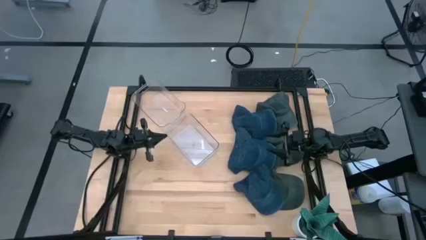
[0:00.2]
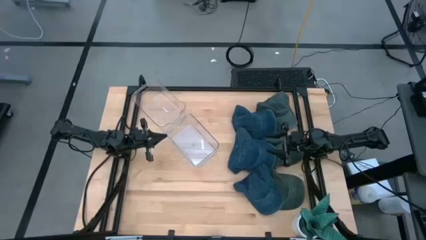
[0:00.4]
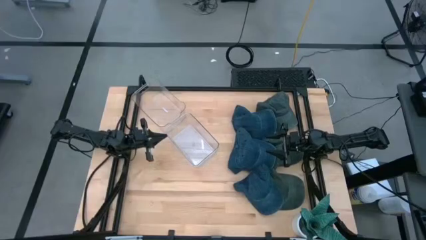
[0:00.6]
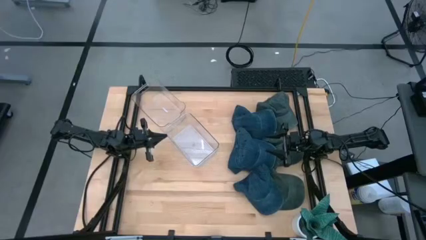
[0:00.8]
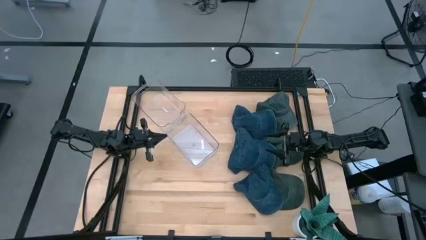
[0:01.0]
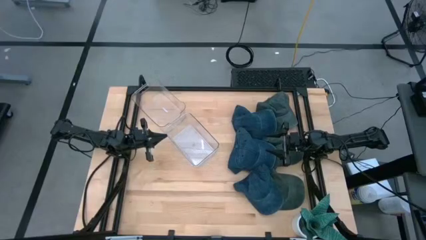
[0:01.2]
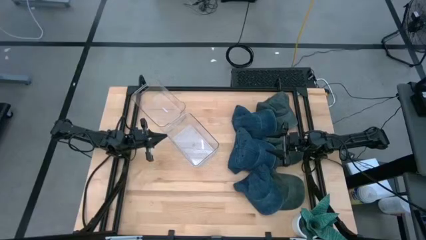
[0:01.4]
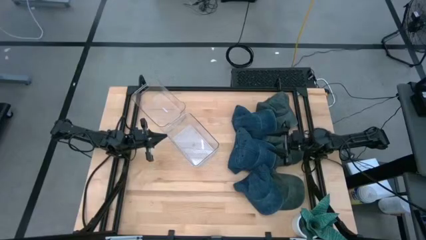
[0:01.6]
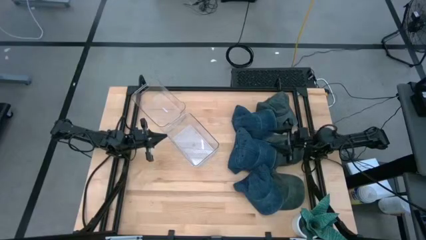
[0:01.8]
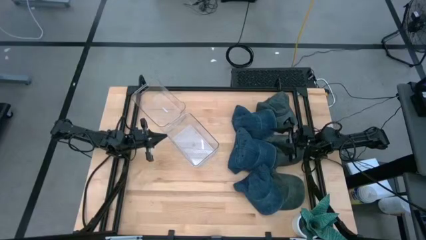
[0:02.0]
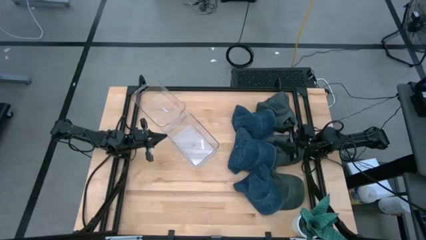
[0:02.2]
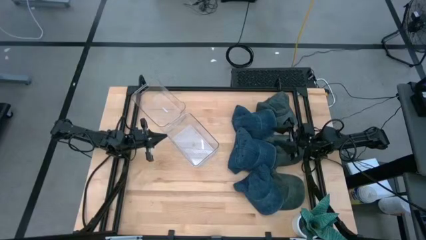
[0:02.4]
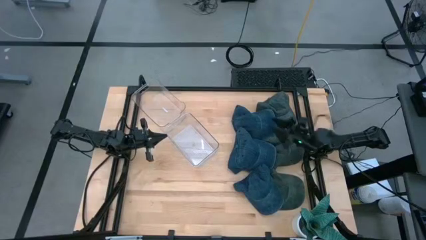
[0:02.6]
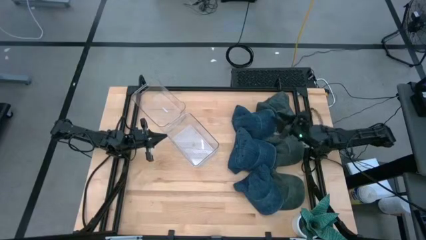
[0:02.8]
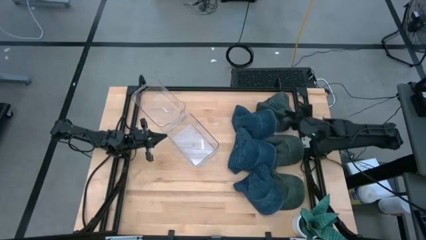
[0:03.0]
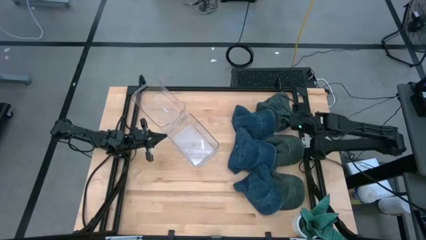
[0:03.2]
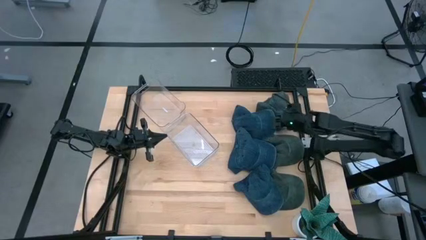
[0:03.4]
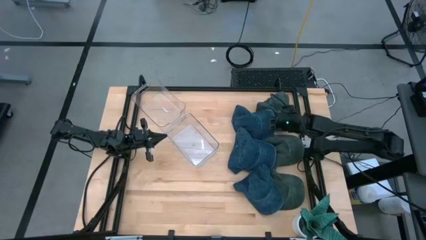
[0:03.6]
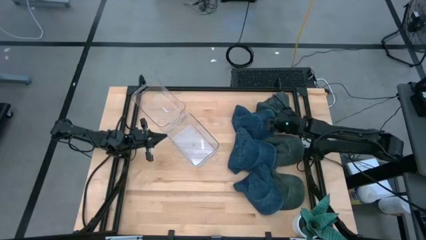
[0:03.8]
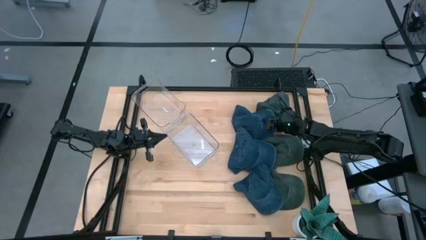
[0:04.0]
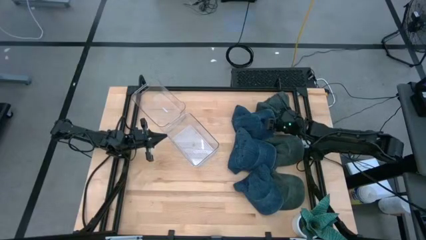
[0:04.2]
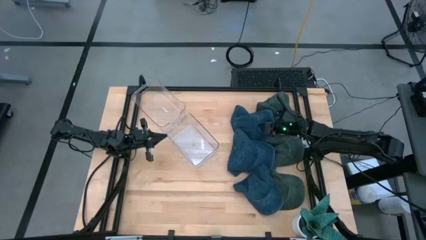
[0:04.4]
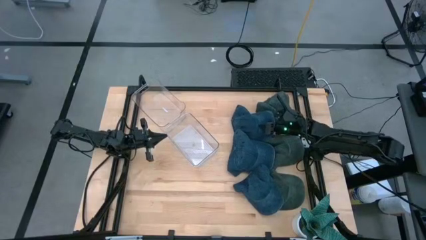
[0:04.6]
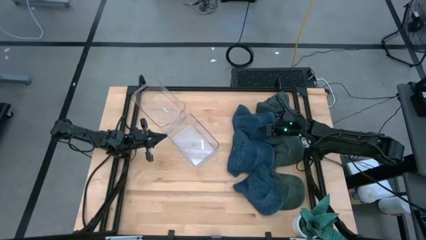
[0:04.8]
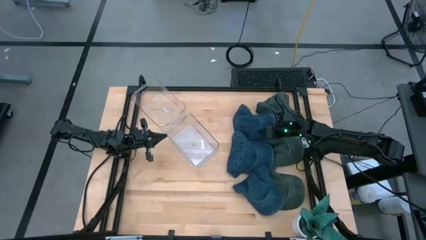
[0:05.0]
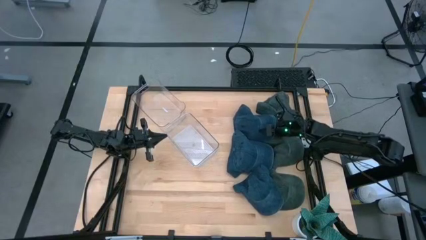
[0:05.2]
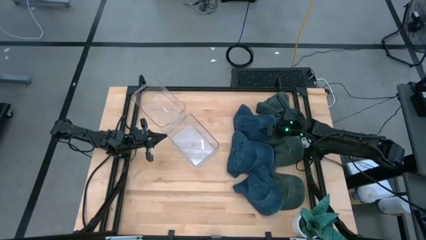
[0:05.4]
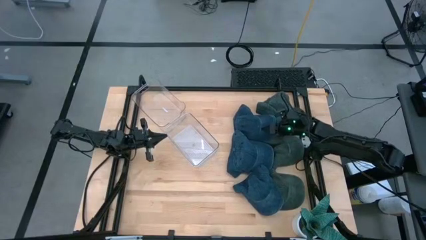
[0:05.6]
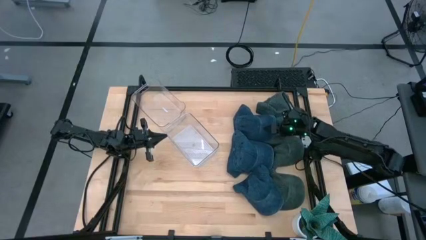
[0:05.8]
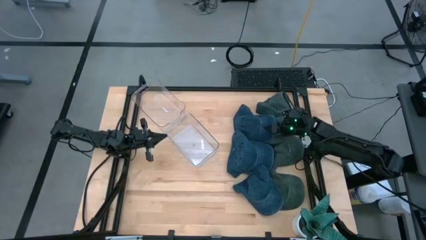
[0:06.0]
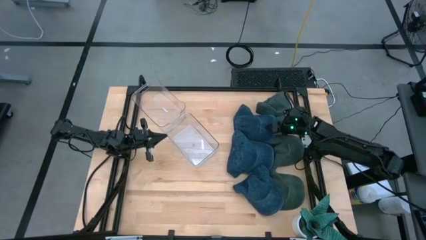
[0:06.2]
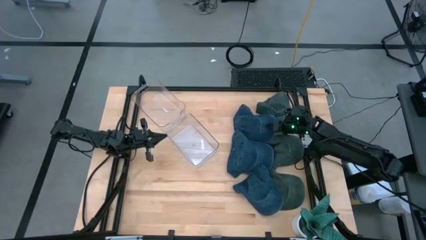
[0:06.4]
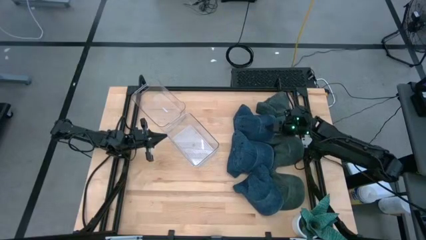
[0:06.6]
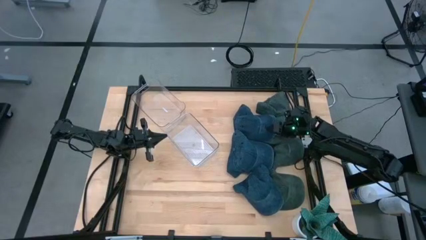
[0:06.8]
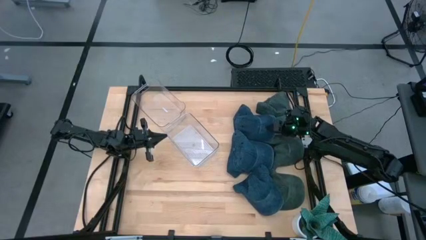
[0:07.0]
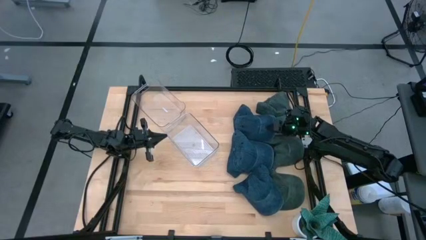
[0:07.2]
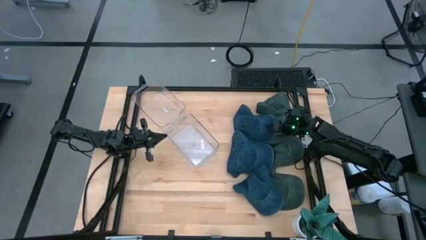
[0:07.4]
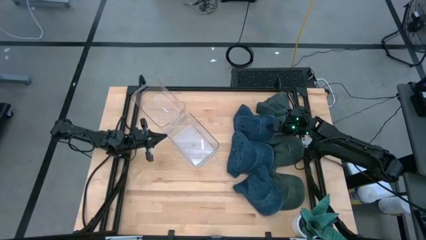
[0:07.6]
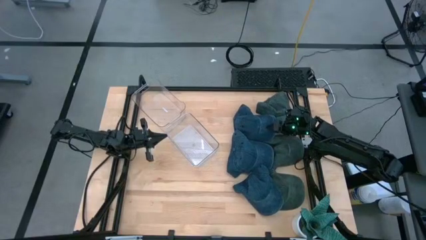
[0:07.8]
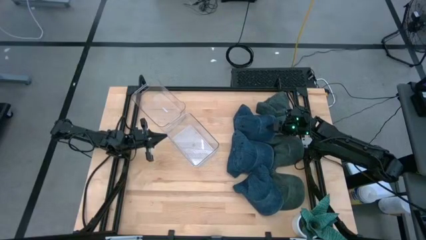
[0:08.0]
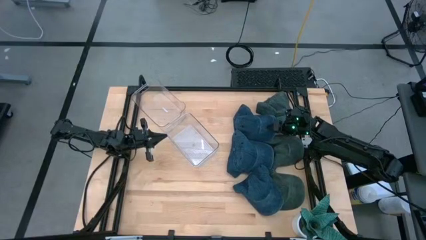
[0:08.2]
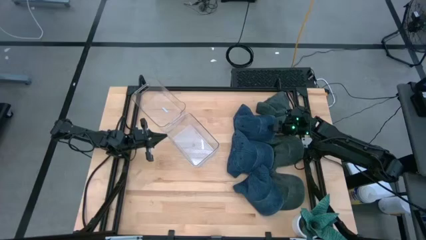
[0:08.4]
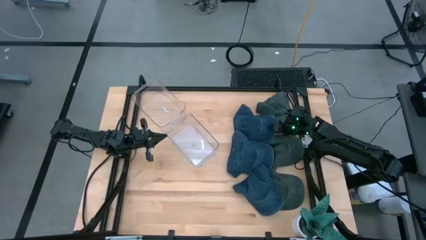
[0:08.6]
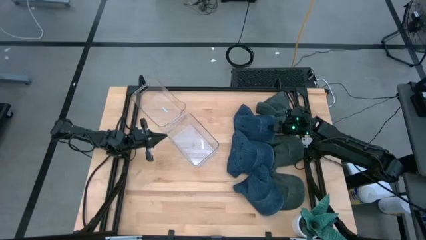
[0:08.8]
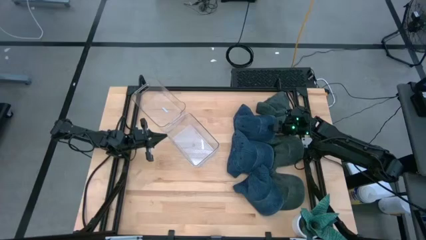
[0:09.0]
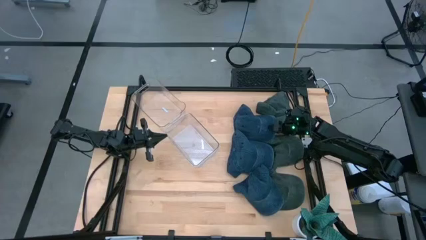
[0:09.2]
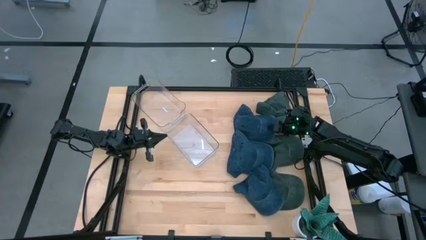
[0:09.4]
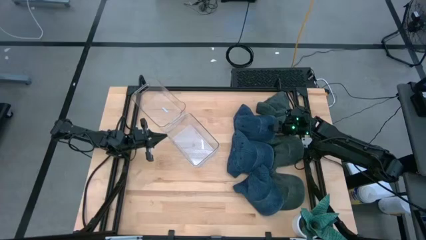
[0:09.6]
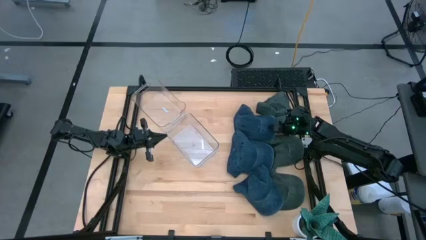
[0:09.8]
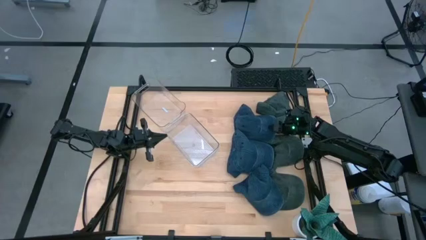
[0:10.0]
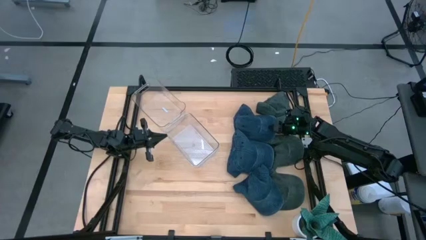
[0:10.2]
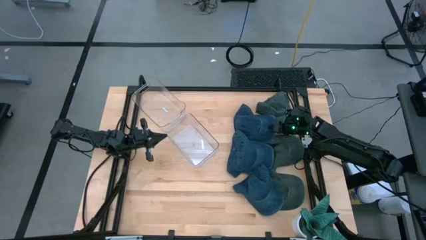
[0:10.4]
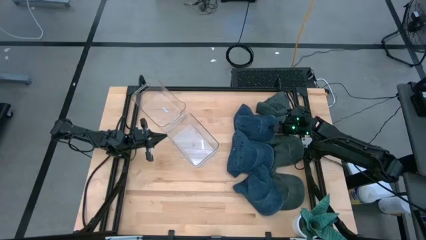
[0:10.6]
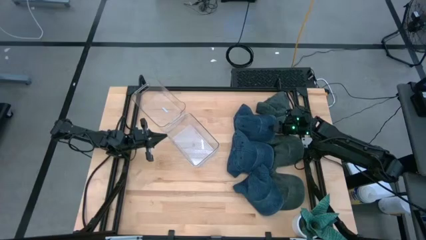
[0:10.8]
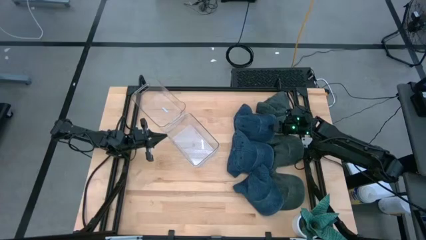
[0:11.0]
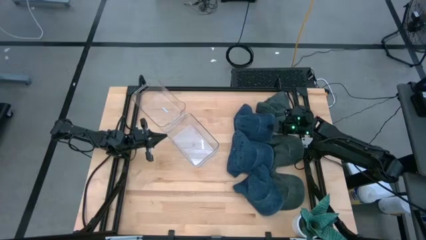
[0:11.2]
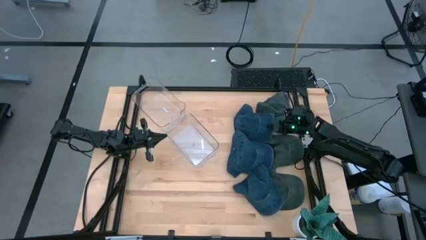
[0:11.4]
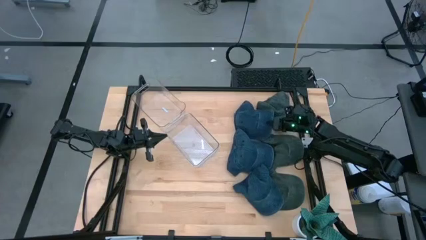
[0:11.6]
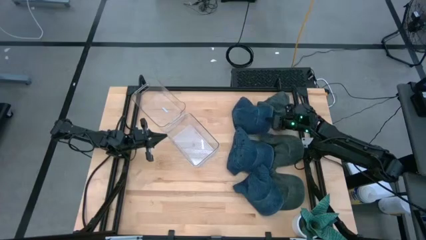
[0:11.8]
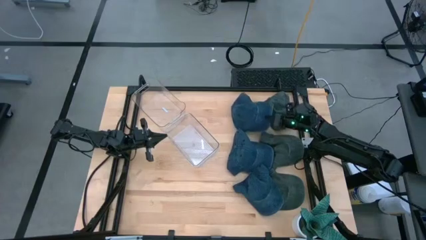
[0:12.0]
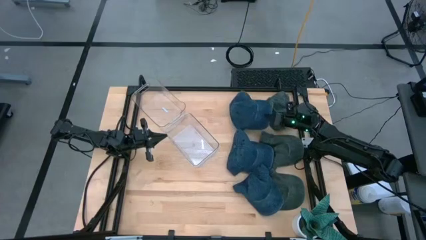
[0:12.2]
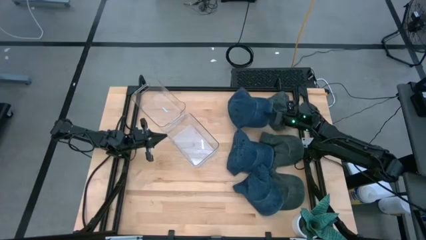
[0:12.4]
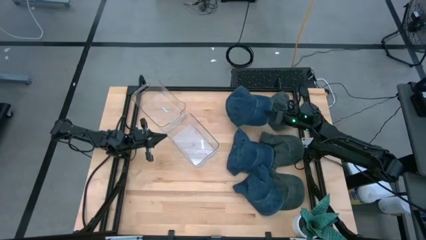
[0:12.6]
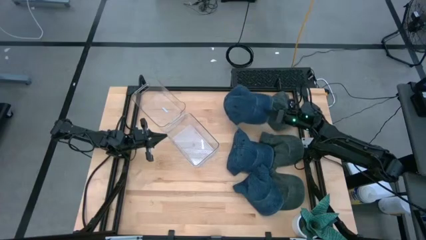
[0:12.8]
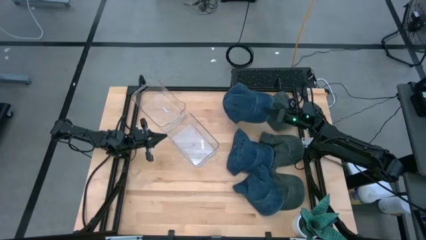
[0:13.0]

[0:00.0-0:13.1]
Task: Pick & Place hat
Put the top blue cap into the top transparent bin
